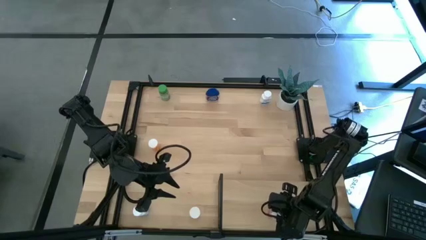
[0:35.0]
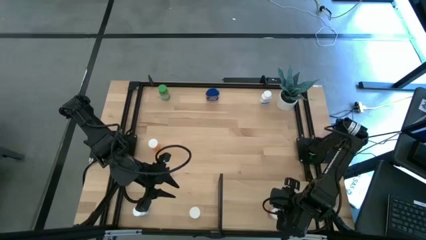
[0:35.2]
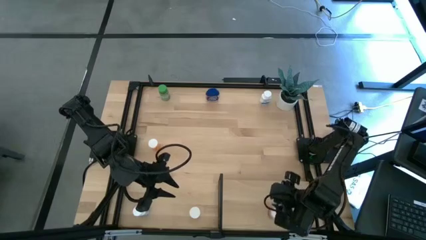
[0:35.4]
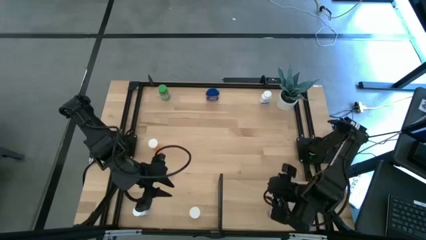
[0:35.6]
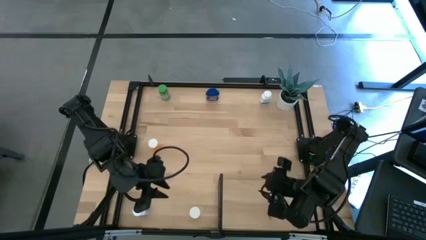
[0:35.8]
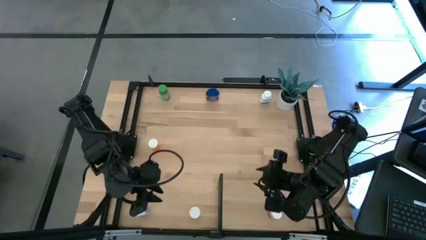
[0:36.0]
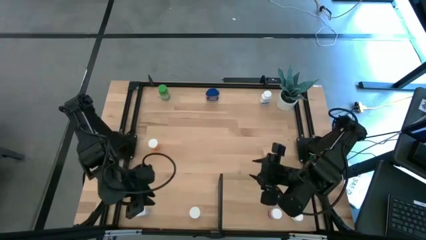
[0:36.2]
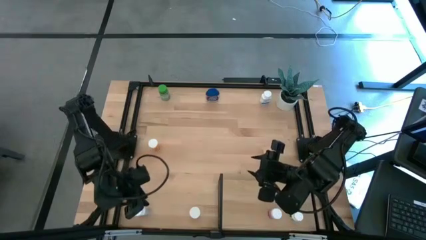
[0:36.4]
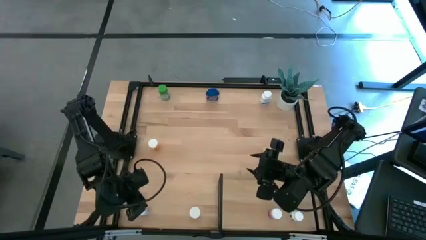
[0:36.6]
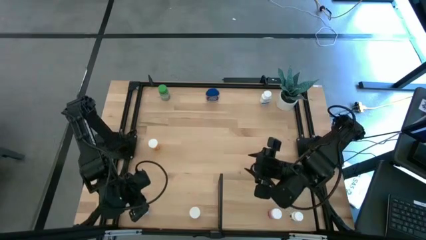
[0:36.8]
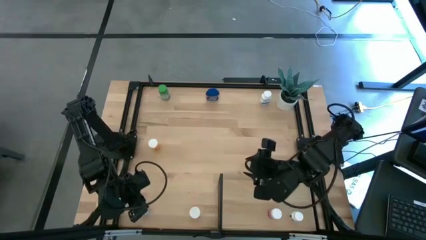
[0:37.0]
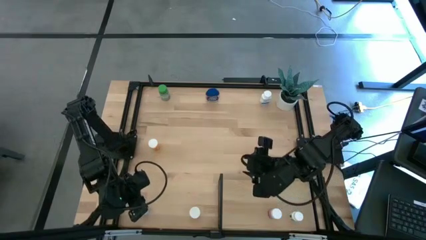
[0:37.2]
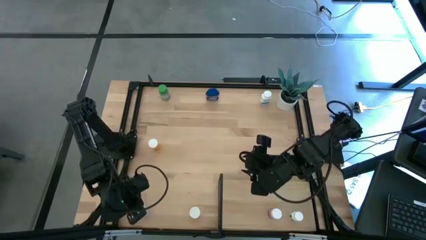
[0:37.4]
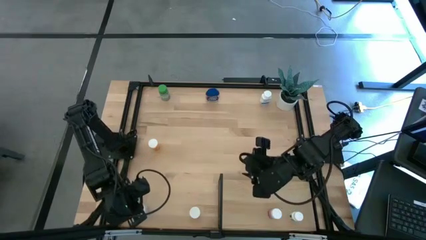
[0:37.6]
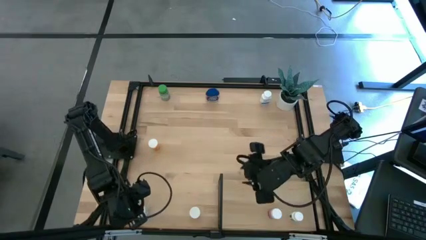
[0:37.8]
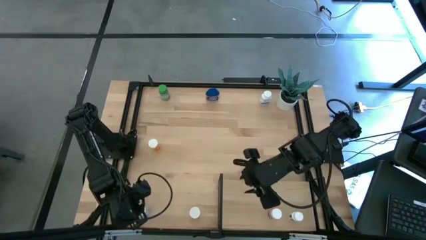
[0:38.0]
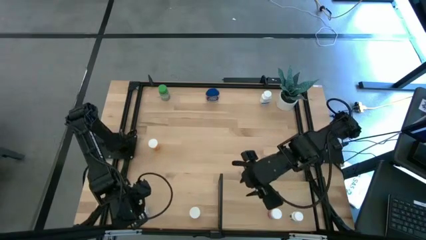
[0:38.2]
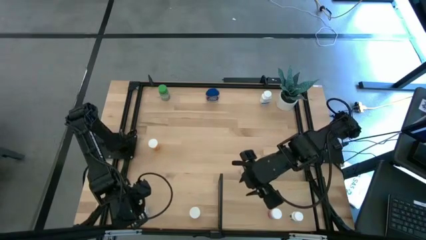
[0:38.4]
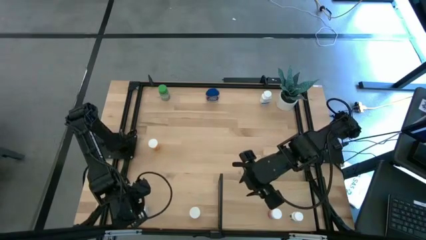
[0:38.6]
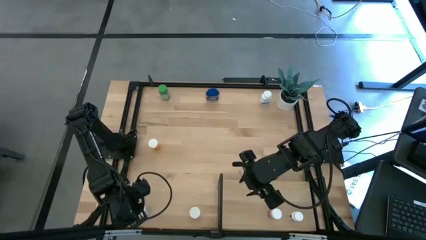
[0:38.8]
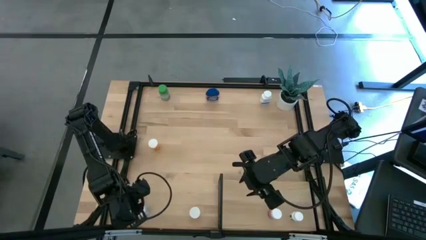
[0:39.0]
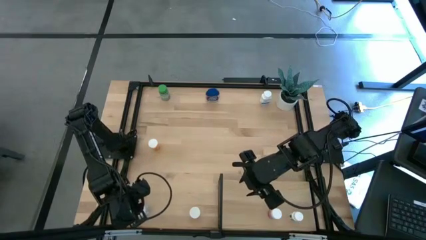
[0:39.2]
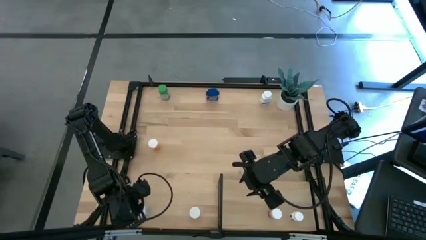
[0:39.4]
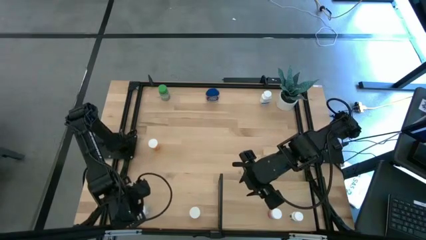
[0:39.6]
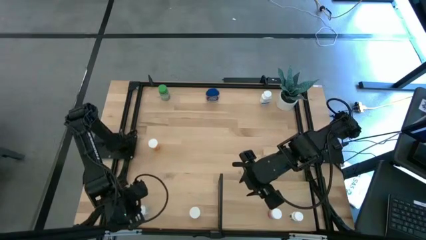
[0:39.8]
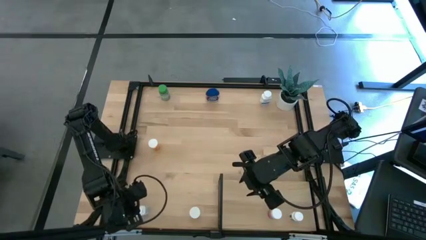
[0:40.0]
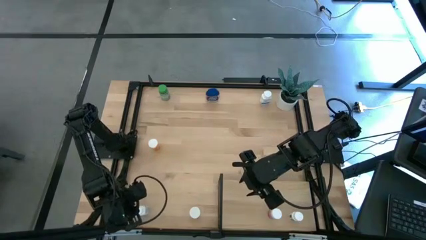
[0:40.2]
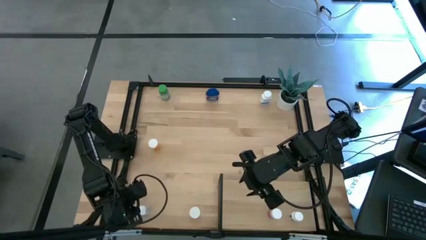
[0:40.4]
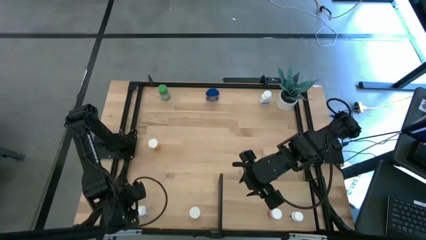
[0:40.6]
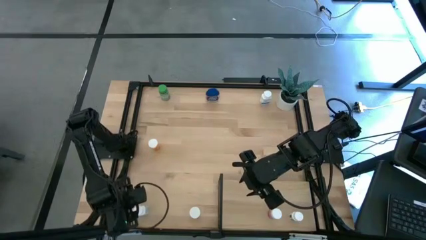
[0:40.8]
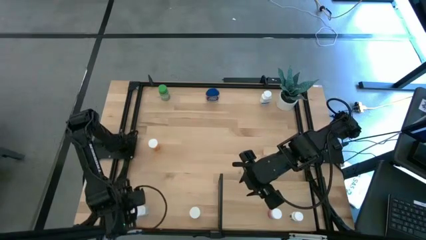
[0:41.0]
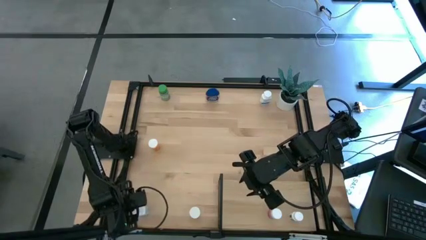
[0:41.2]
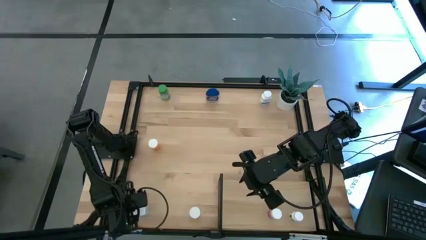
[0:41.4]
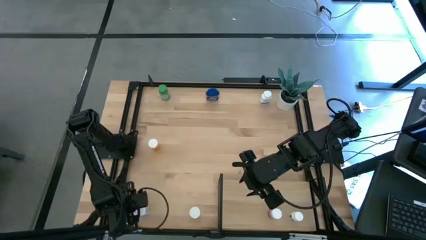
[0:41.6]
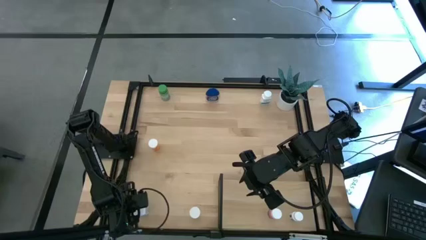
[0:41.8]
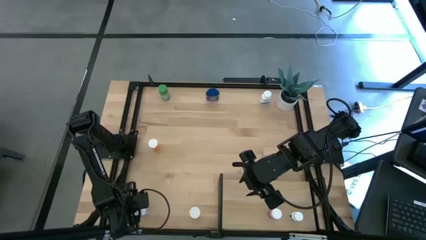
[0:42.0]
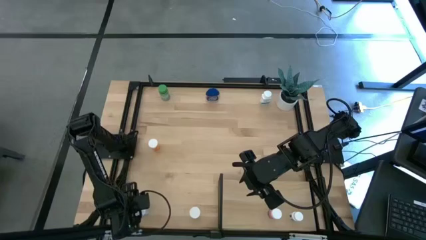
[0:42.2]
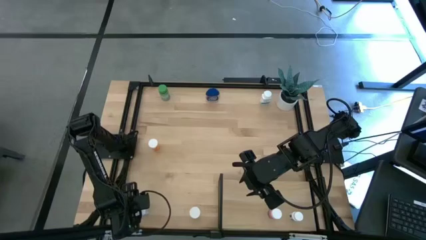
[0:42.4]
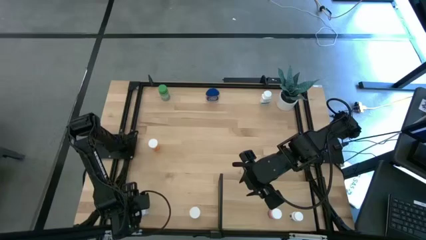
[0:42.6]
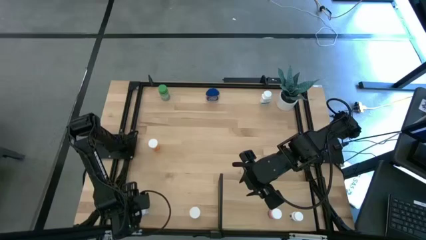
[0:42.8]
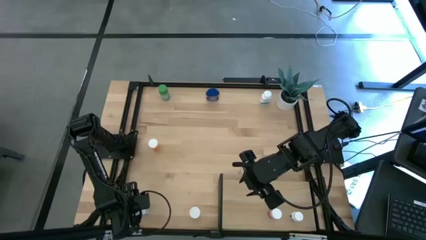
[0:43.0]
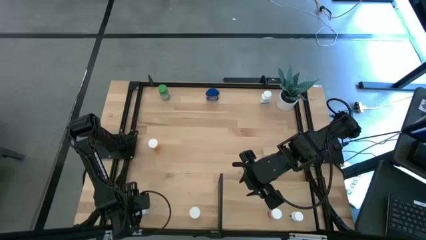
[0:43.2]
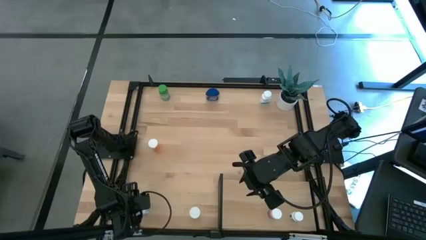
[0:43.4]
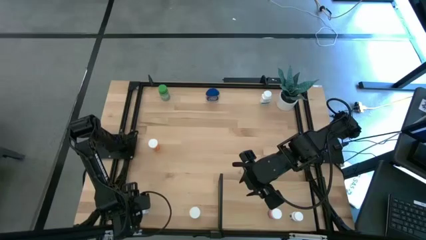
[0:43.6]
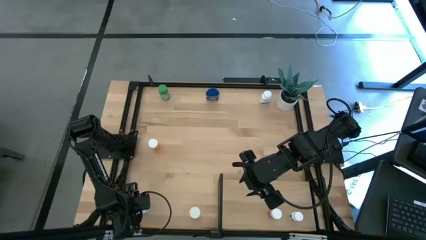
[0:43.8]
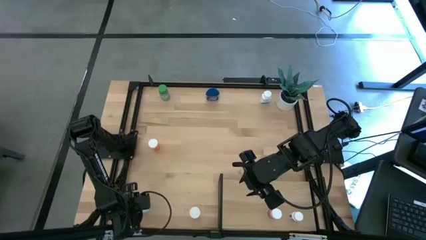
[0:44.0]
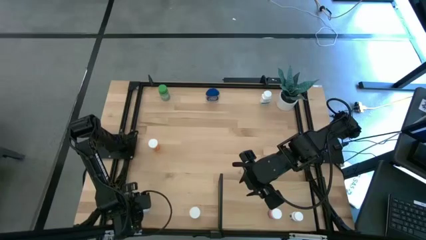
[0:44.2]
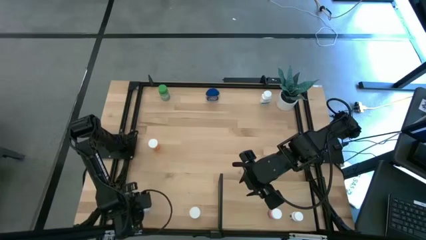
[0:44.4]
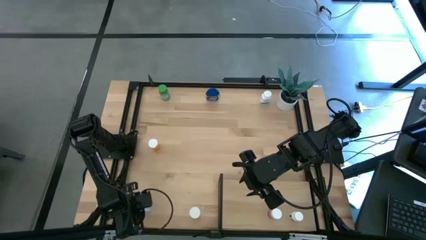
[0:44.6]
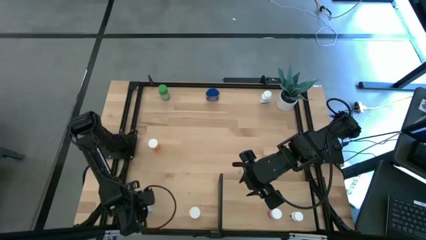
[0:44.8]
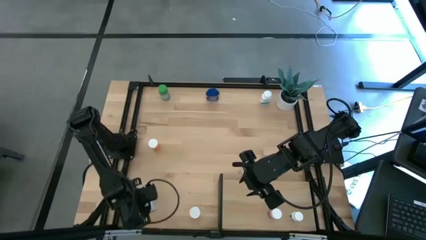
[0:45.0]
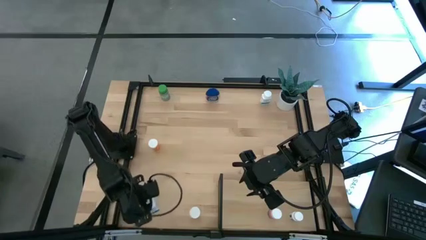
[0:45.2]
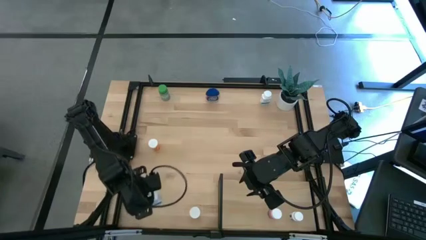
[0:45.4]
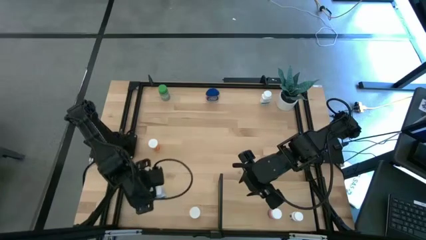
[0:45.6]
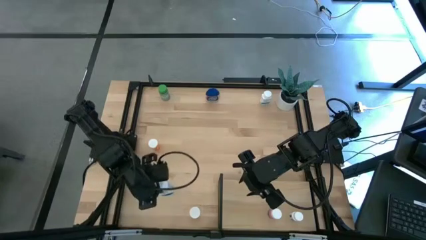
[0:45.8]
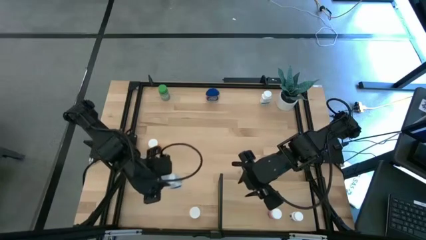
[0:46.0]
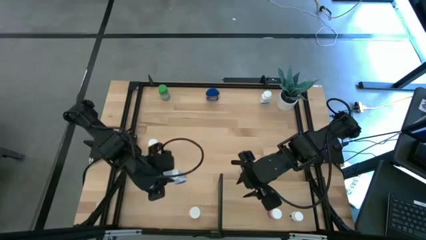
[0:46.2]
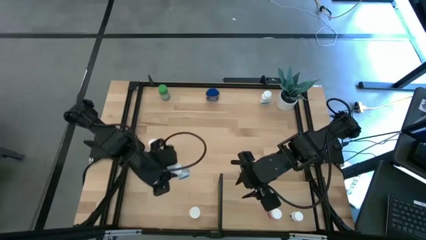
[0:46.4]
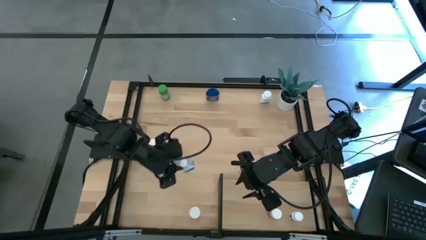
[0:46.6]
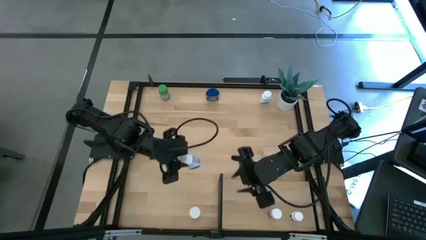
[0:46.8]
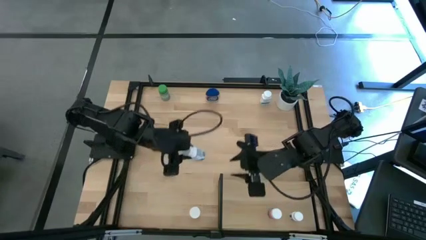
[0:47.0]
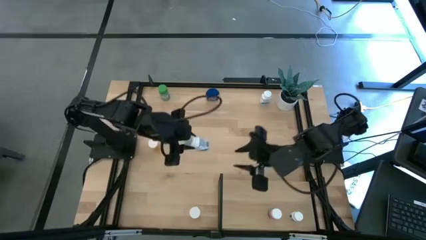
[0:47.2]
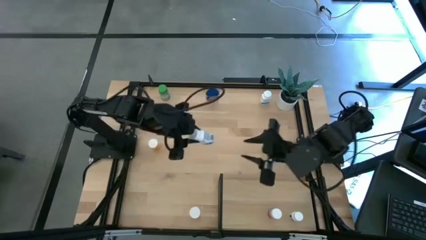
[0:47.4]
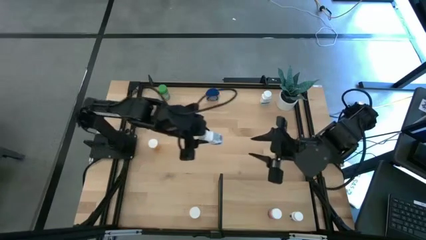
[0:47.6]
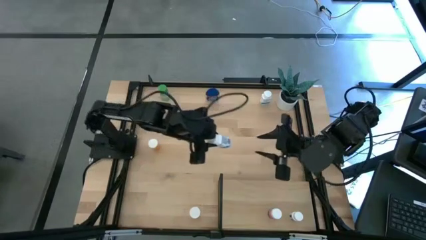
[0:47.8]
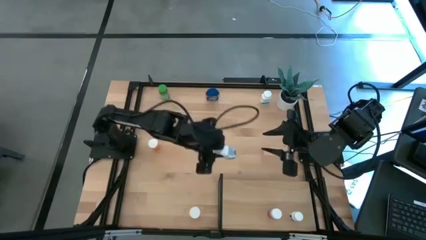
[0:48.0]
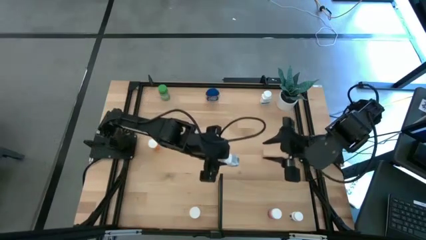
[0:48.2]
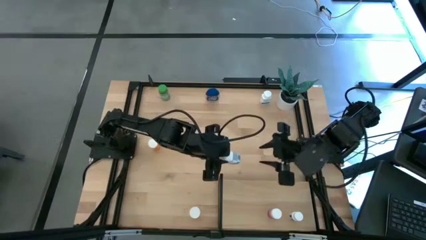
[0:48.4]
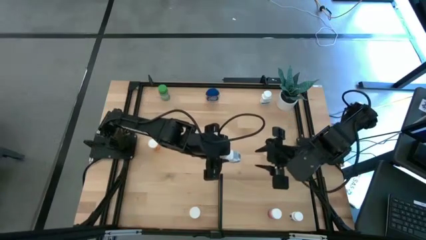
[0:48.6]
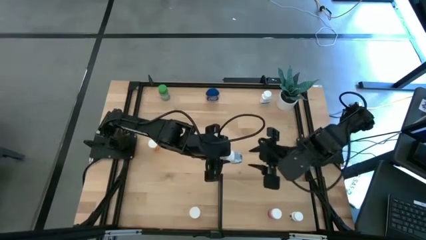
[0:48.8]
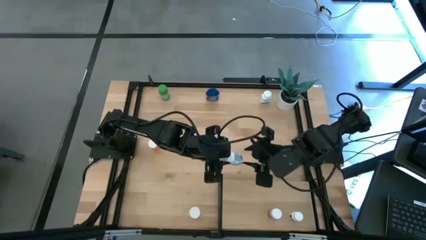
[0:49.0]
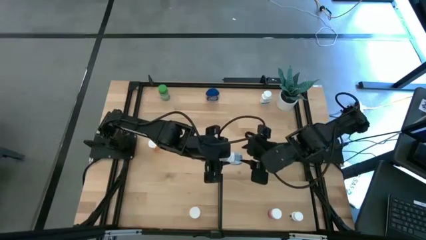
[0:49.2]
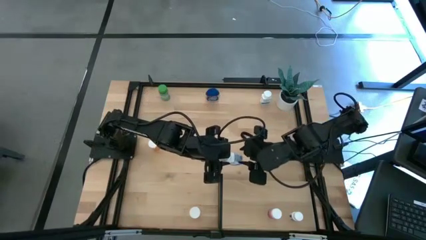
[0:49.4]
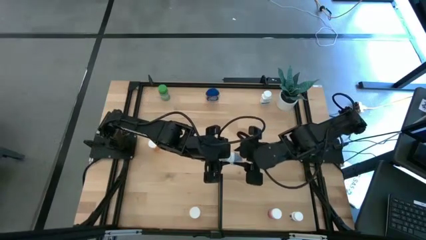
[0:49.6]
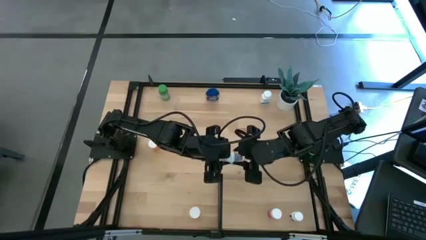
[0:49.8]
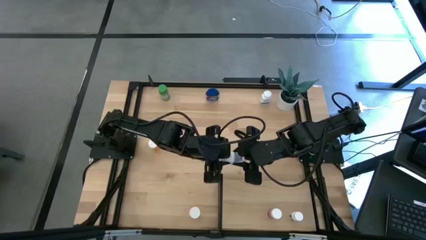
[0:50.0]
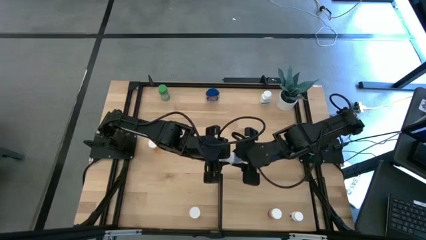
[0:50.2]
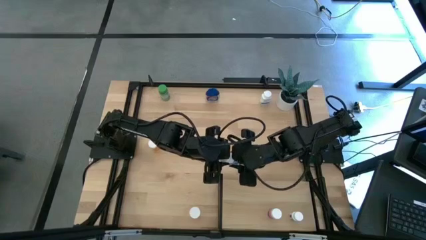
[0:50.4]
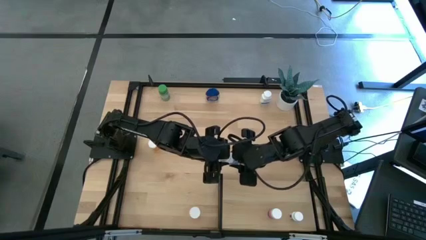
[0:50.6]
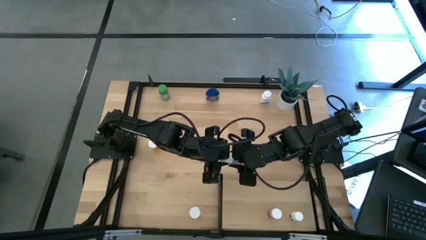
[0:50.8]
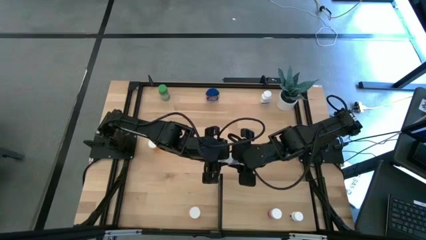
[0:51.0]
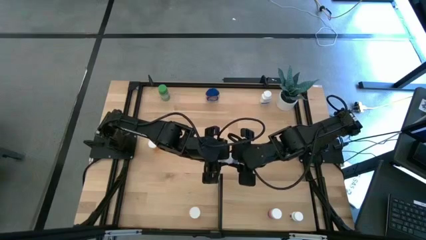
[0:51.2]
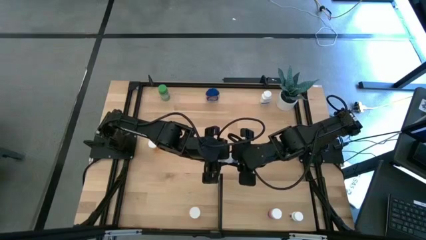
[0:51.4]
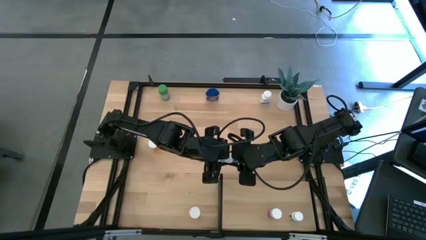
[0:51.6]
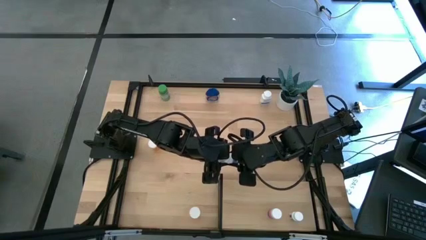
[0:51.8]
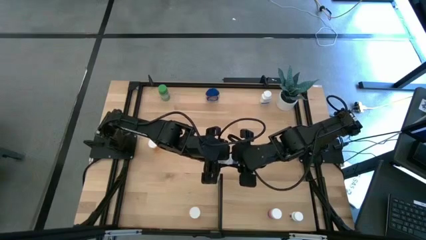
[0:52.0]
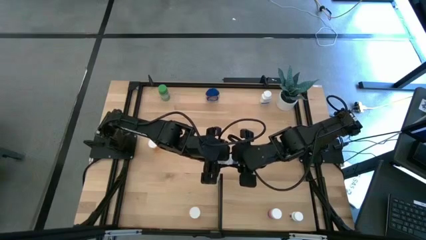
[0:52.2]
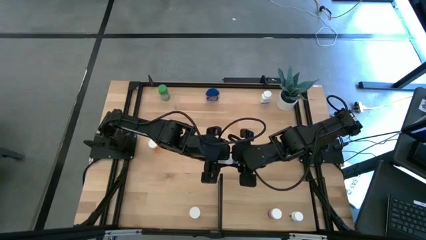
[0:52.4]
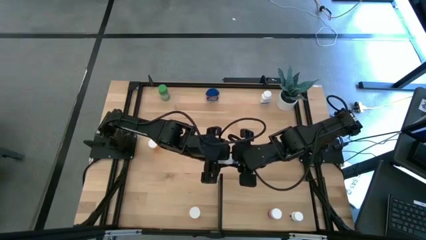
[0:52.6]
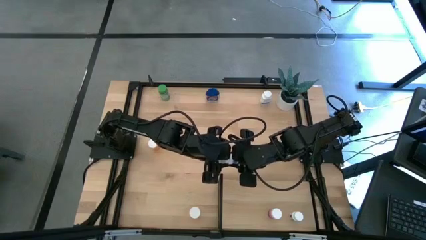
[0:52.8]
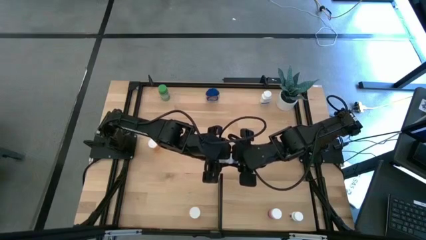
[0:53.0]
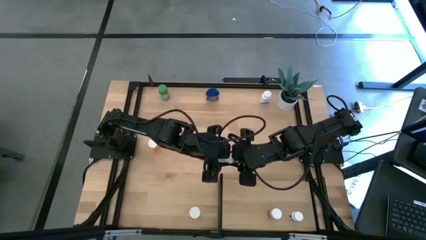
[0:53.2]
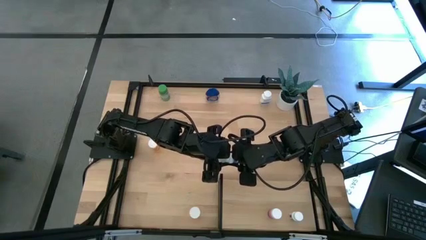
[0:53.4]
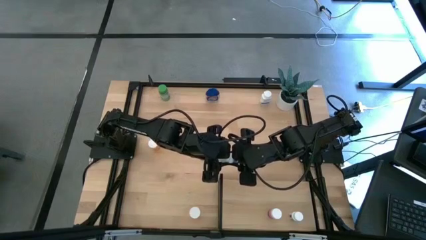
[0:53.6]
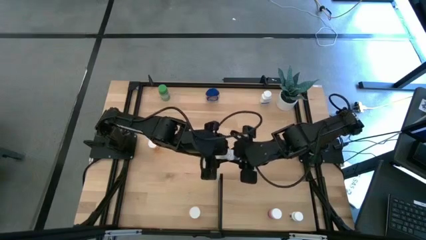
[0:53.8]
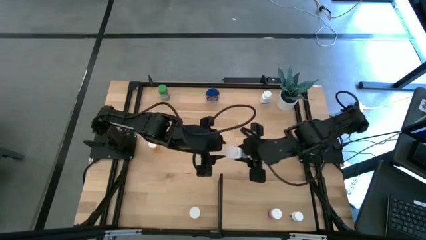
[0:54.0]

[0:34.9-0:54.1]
Task: Pick and place medicine bottles onto shelf by color
Put the bottom left white pill bottle onto the shelf
